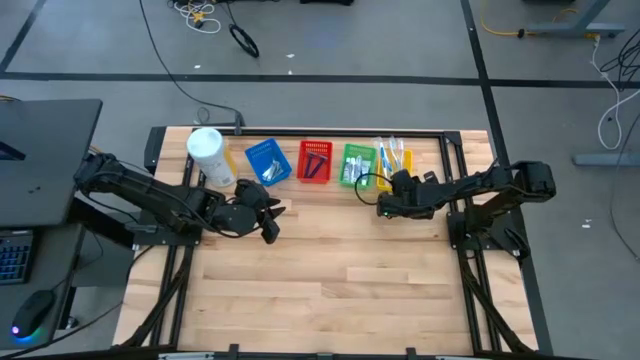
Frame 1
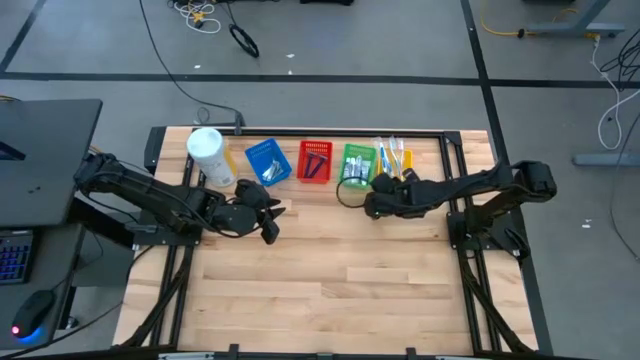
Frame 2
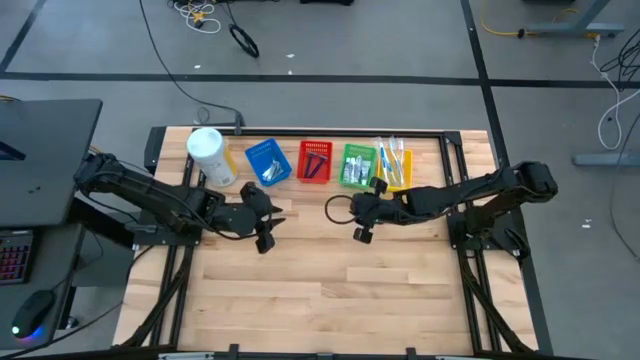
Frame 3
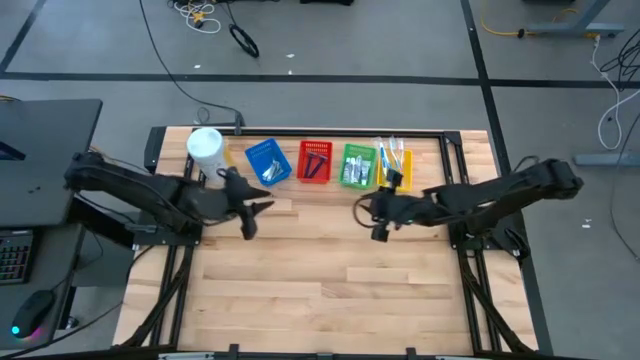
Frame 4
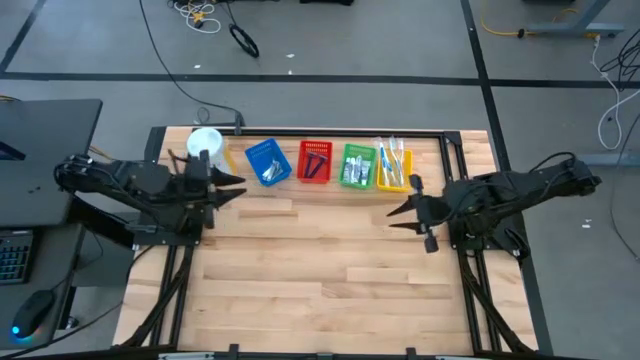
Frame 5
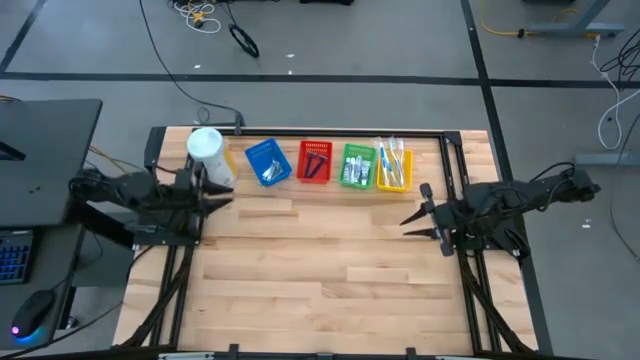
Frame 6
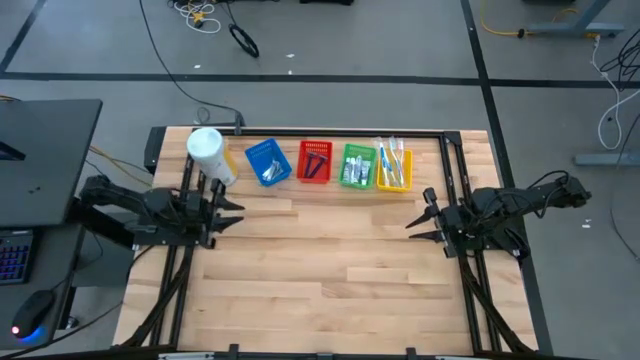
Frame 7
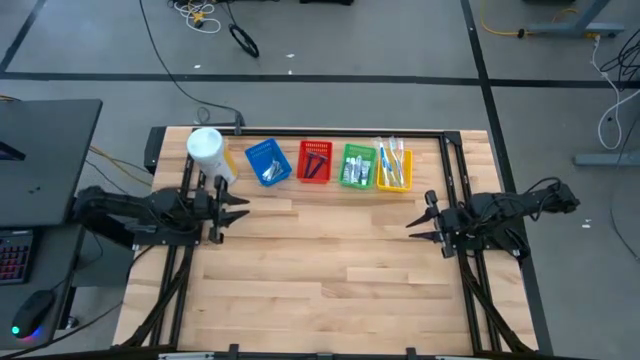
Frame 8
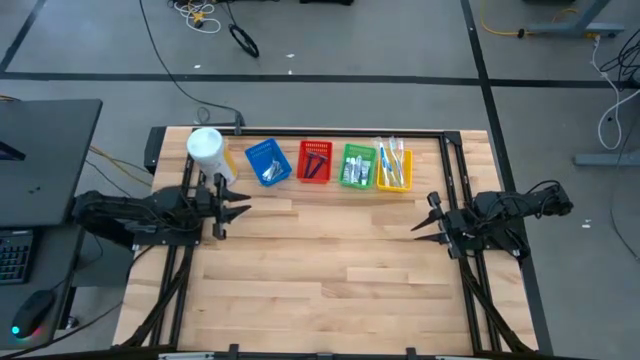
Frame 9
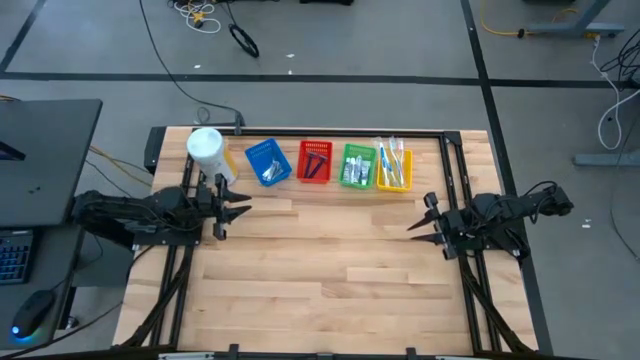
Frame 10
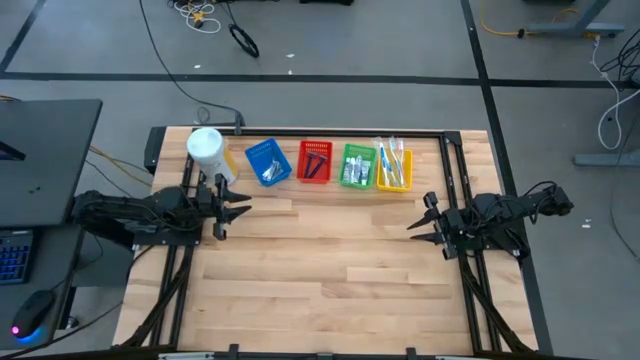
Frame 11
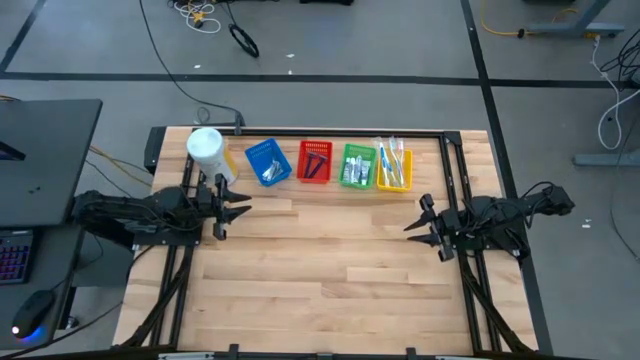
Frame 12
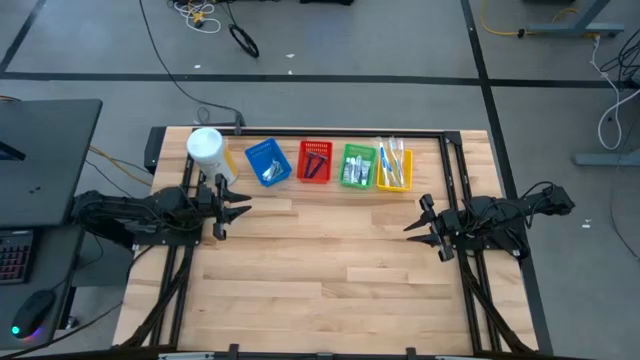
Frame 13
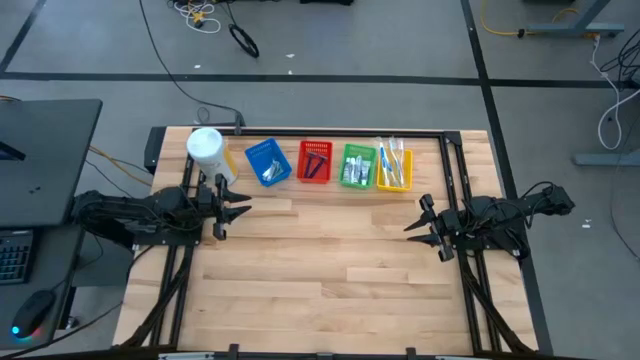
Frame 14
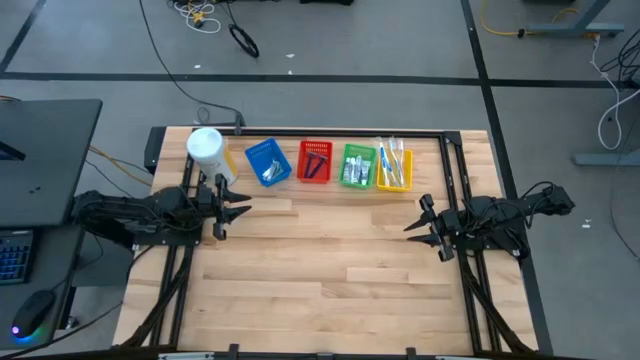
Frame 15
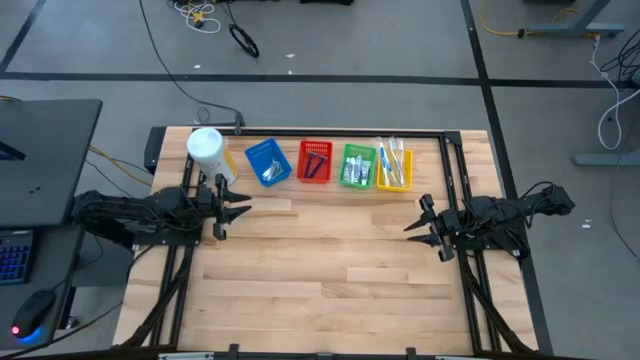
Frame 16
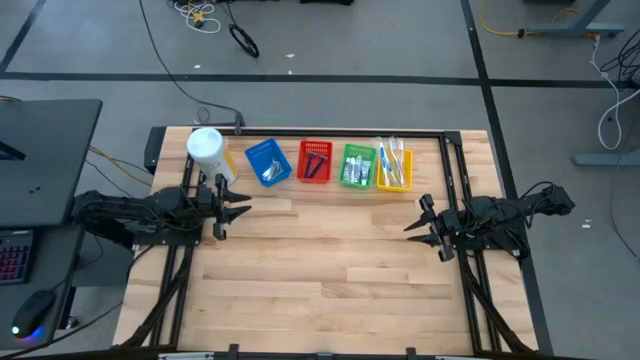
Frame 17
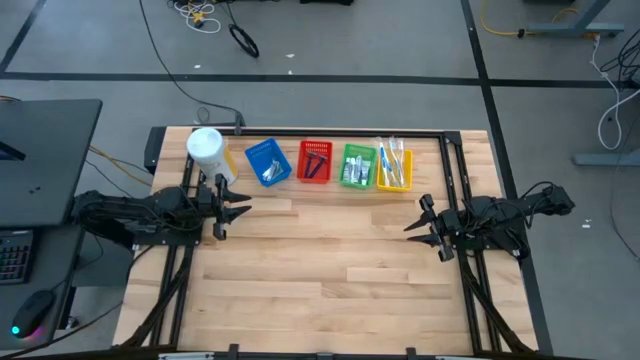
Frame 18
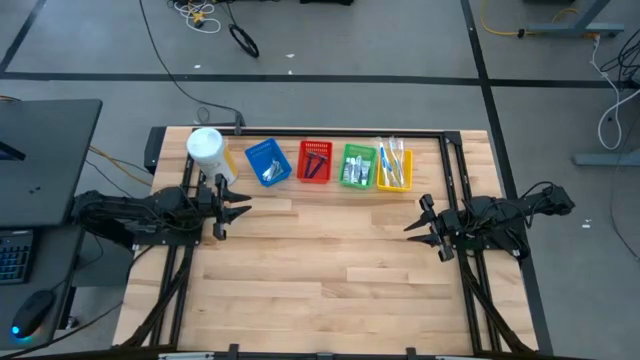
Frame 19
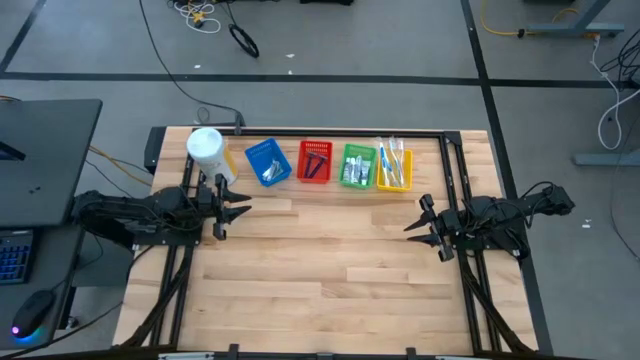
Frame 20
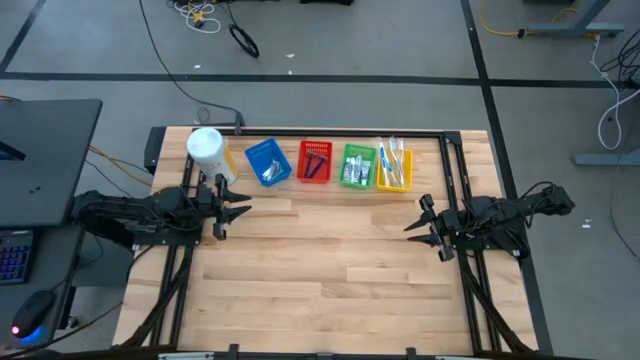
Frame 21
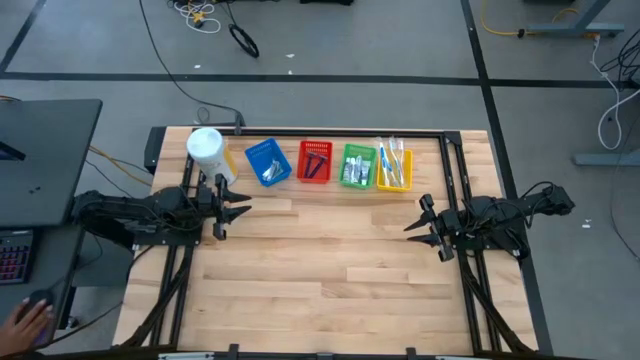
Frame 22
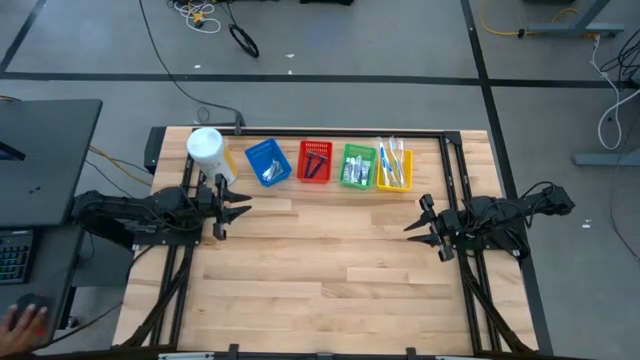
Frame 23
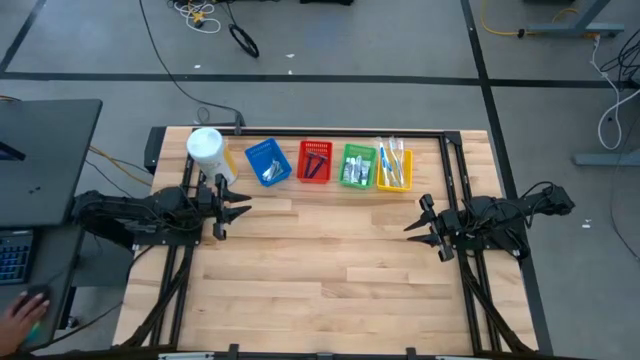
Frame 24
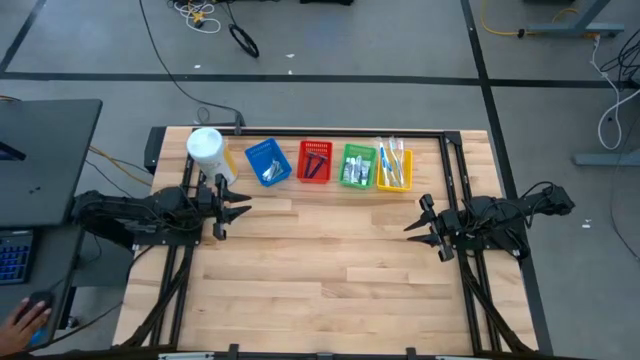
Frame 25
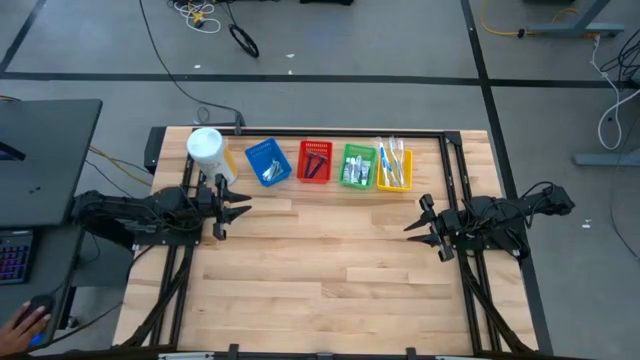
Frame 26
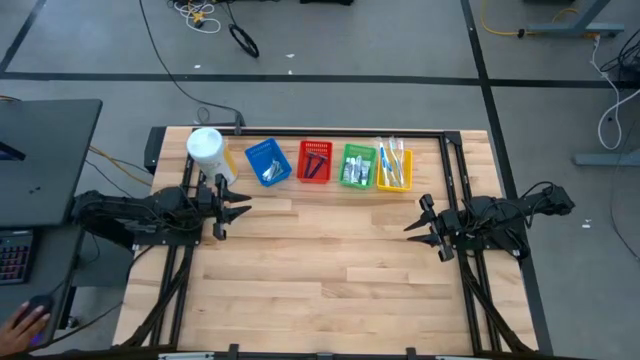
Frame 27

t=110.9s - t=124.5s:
Task: Pick & Place Travel size toiletries
Return to Home Position

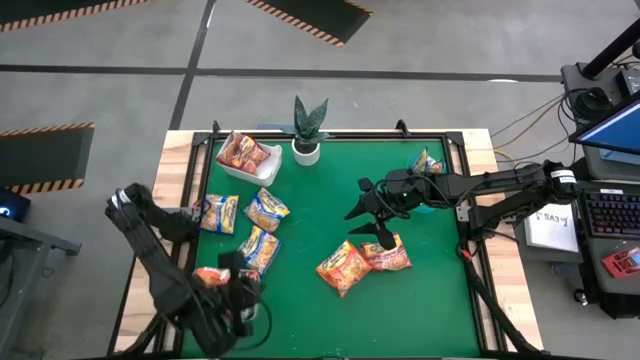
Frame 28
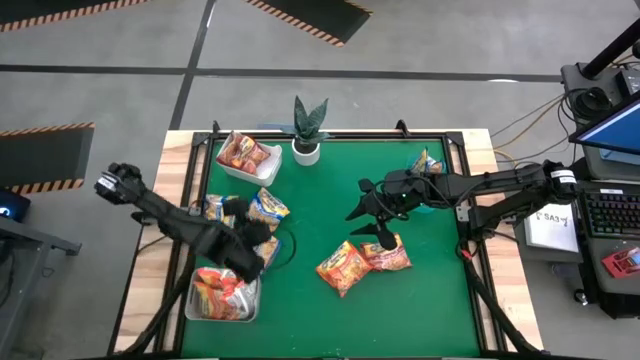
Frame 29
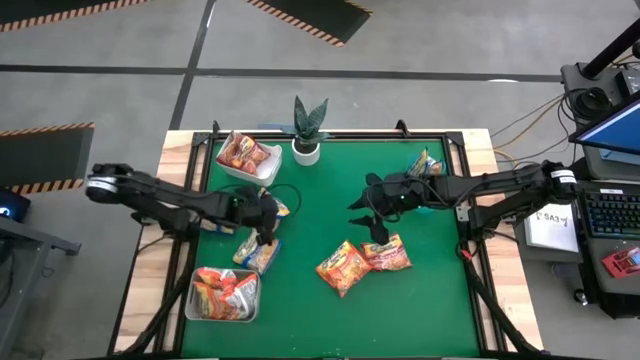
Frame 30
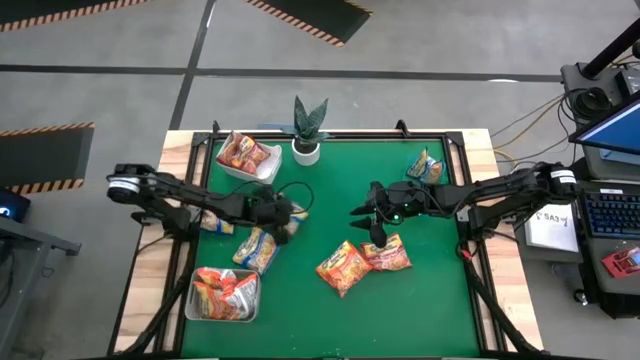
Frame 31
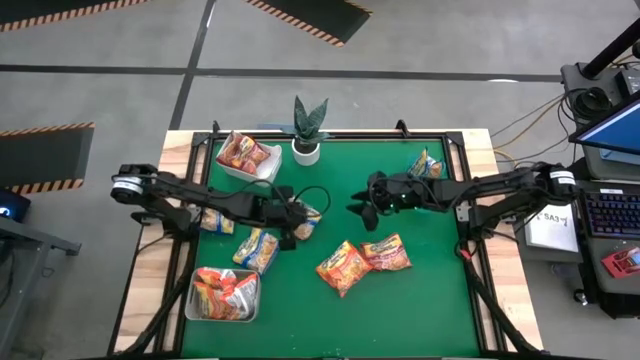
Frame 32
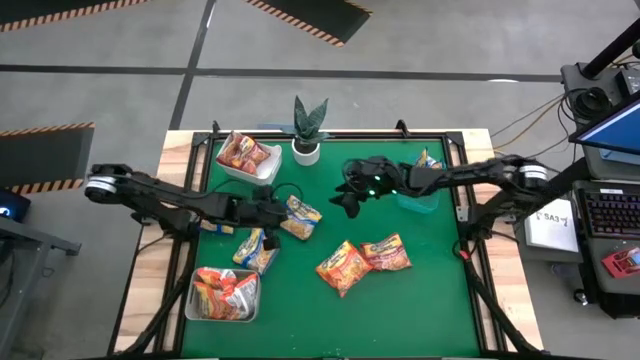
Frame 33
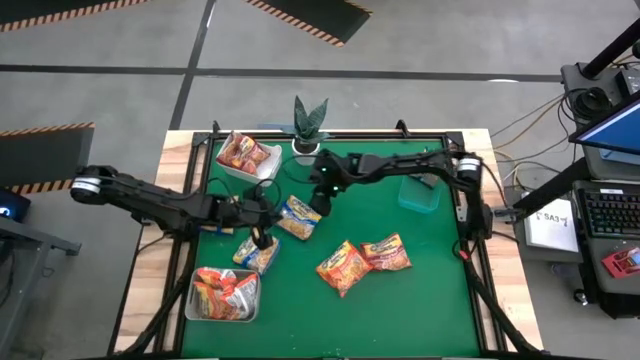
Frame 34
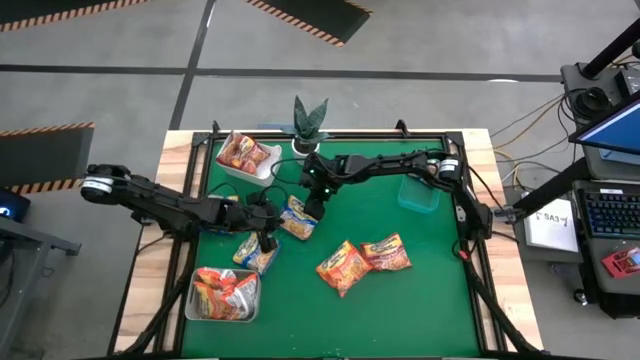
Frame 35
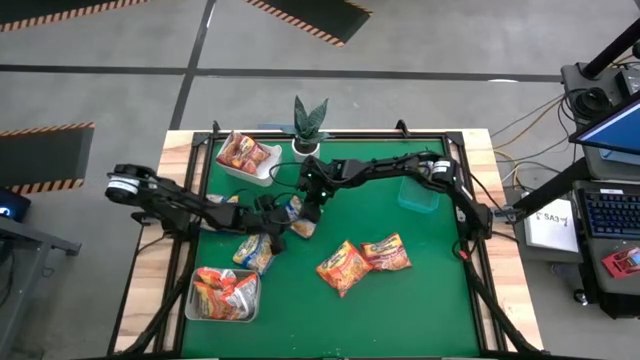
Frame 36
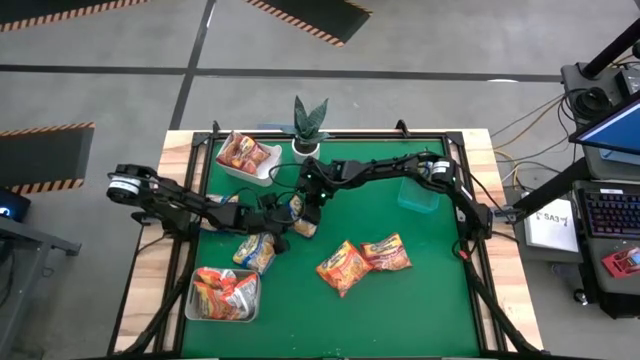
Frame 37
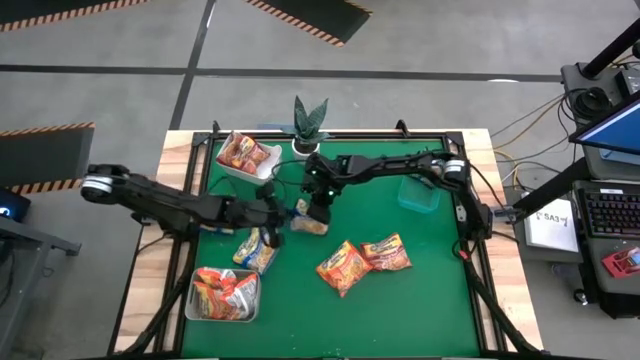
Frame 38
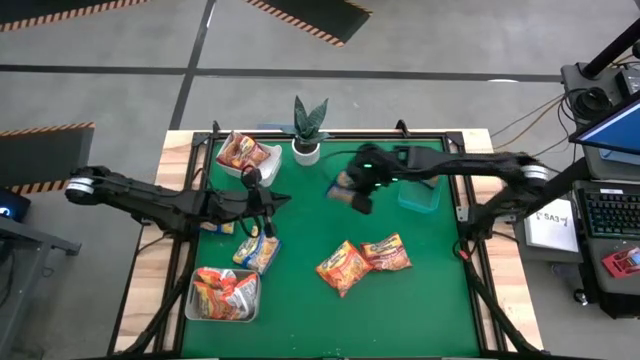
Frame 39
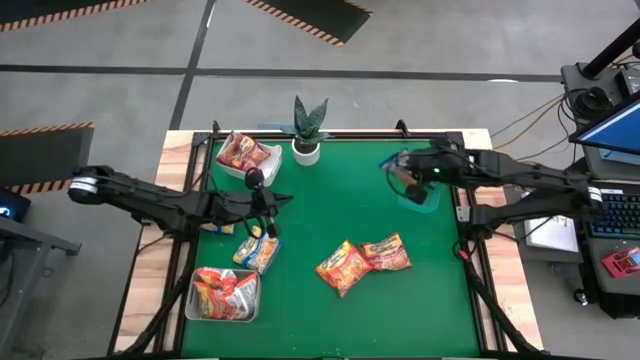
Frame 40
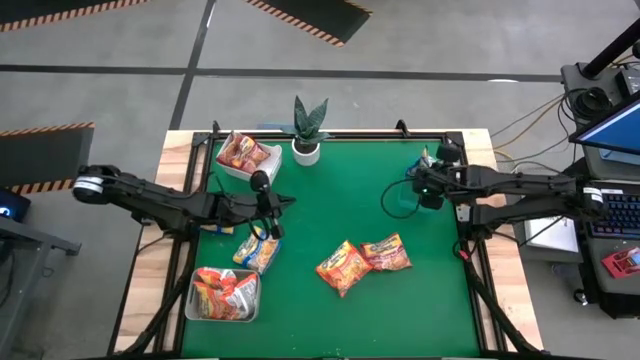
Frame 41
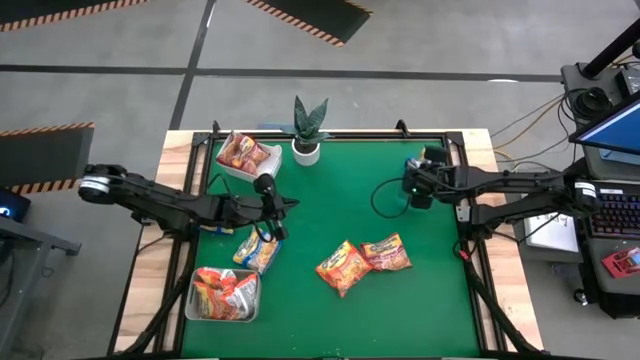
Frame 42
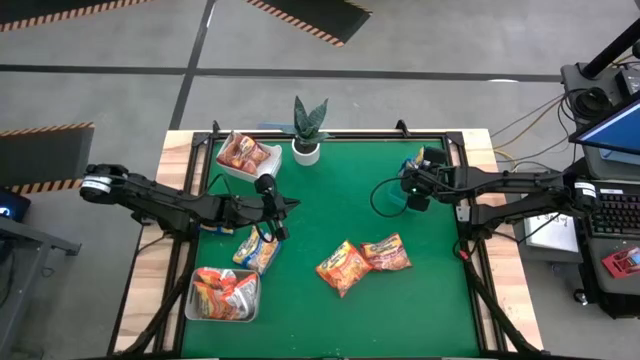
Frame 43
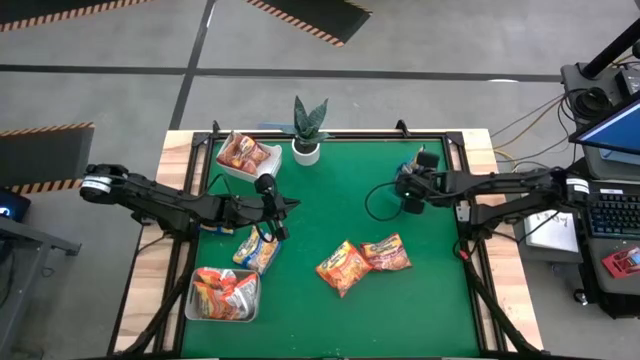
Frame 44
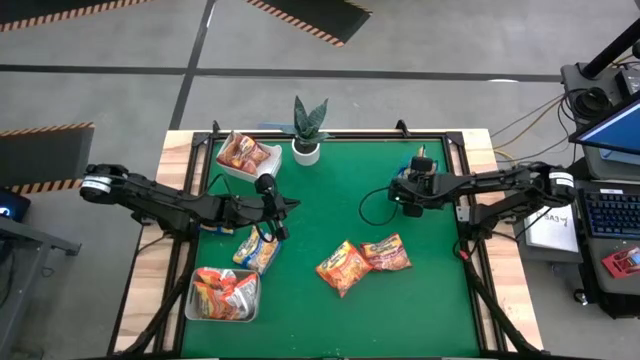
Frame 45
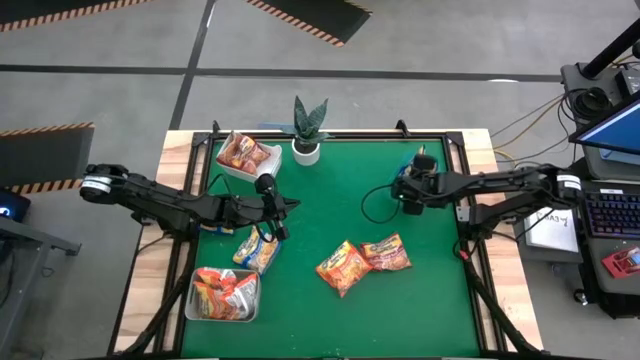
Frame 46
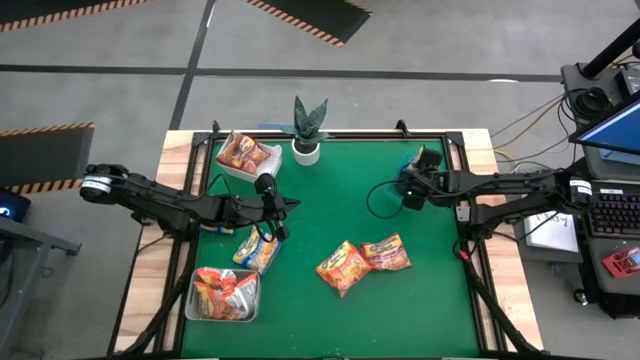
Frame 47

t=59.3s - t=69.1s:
Task: Sort Maruchan noodles
Put the blue noodle pack into the blue bin
